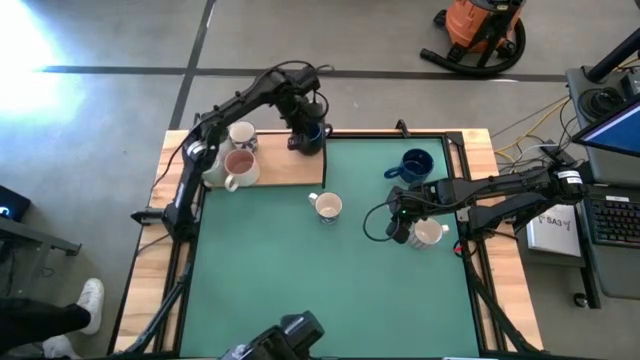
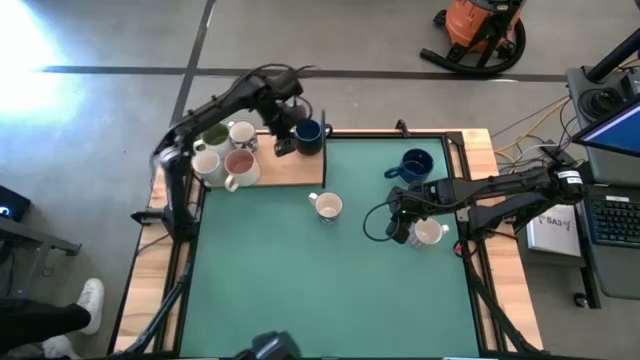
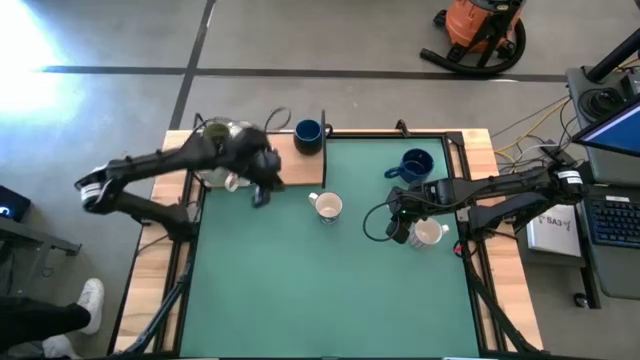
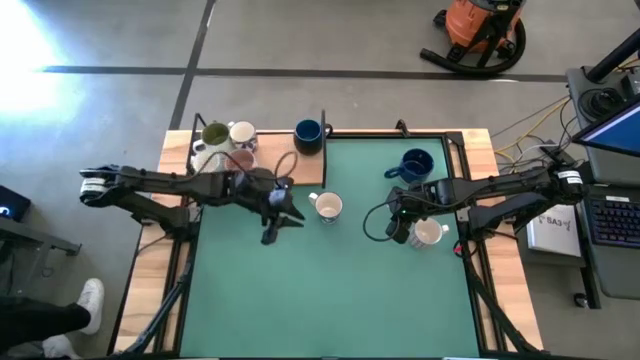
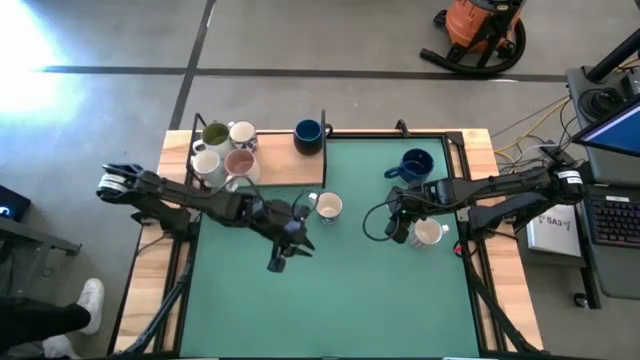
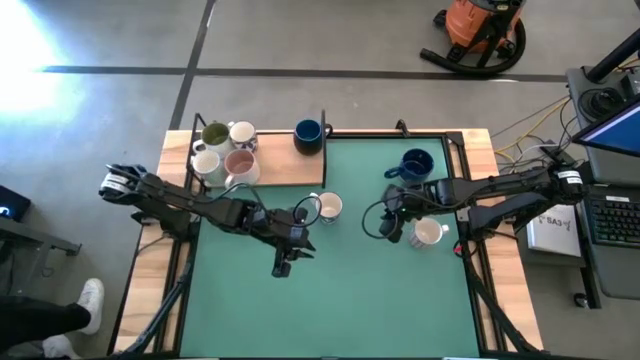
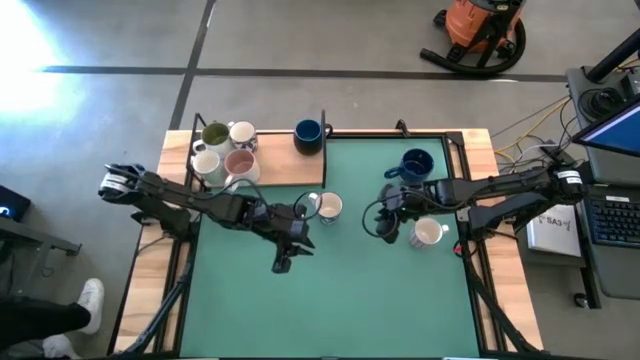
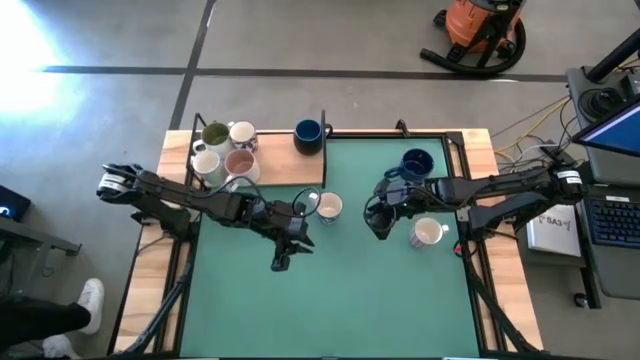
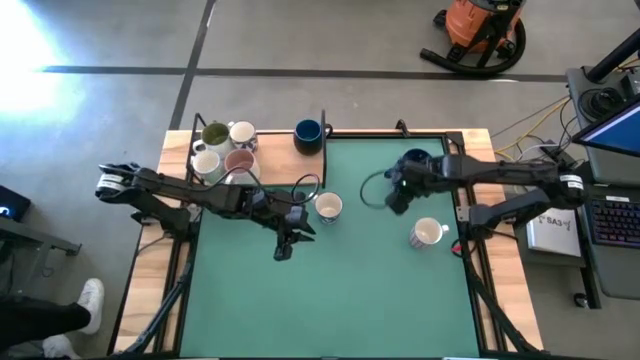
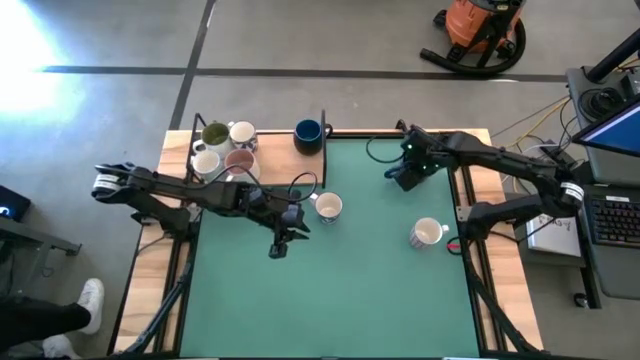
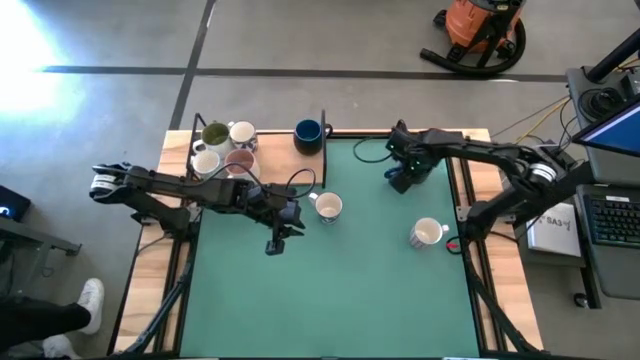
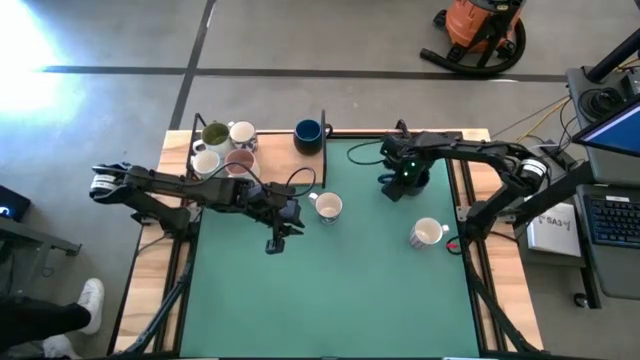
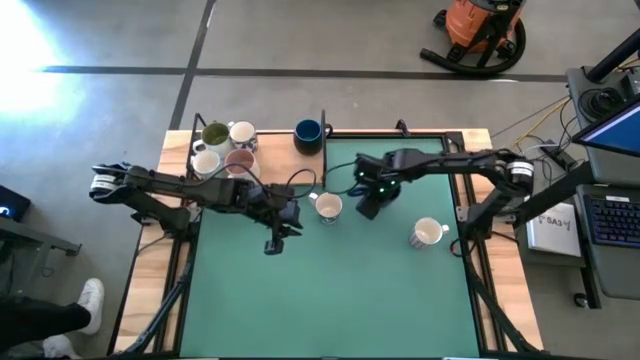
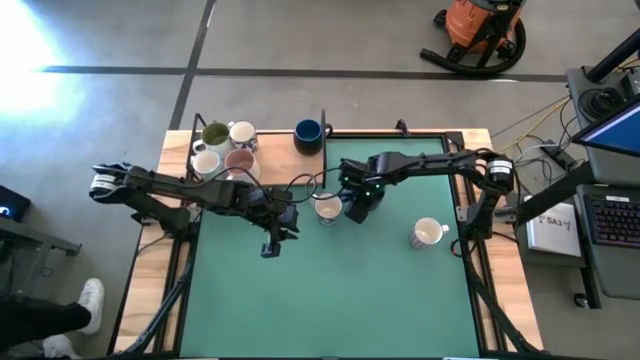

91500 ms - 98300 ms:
Task: Place coffee mugs
Move the blue mug to the center of the table

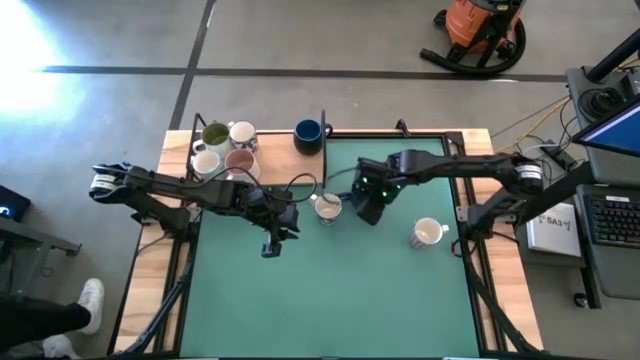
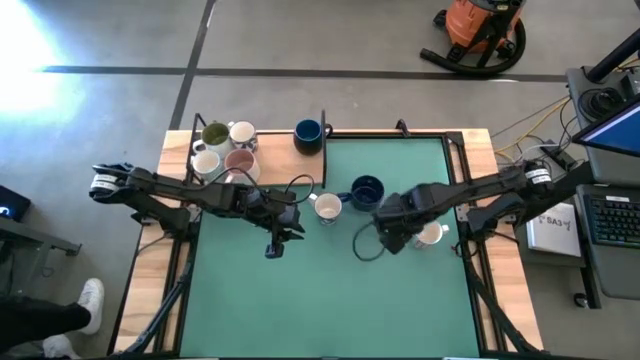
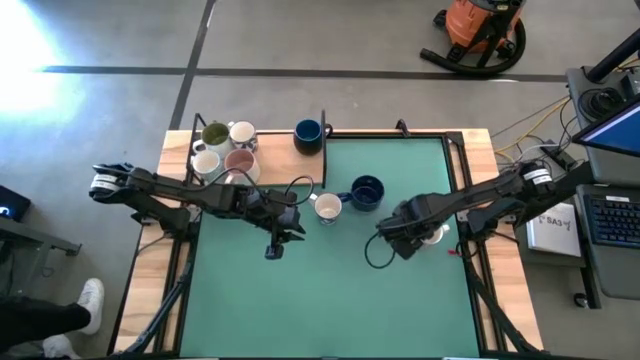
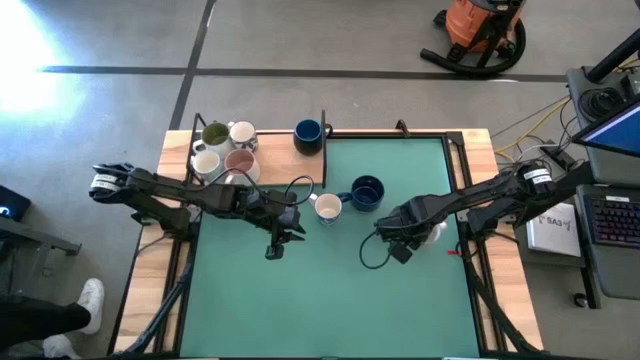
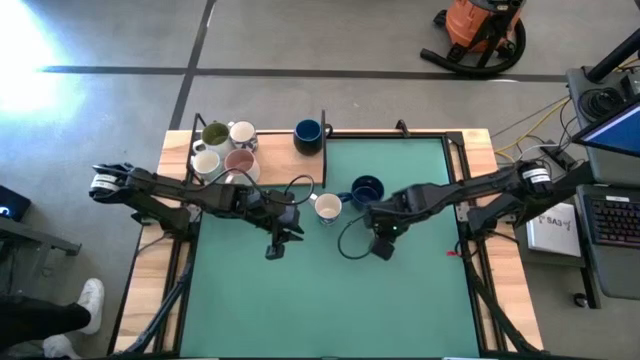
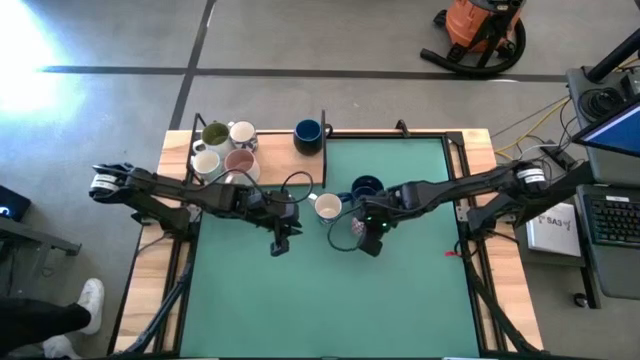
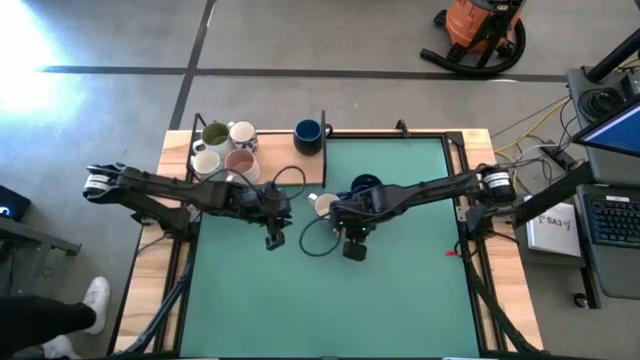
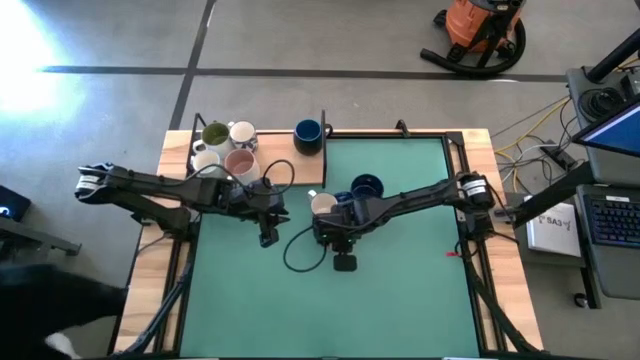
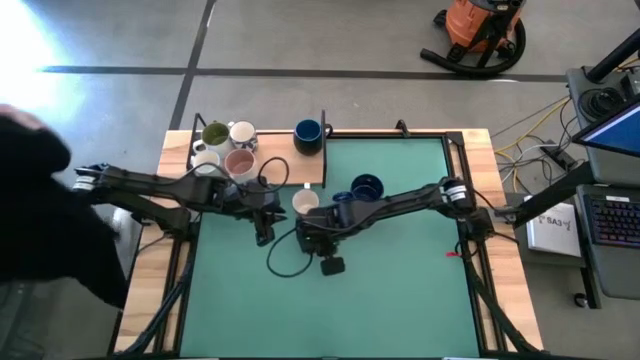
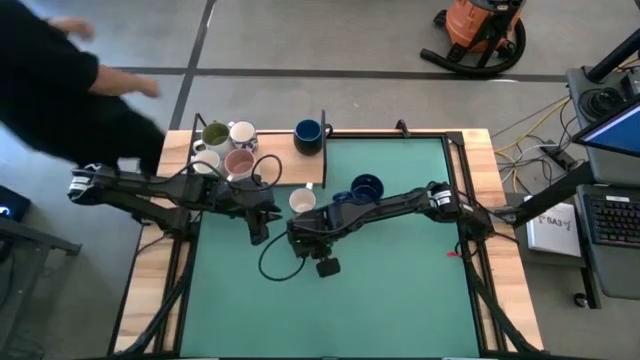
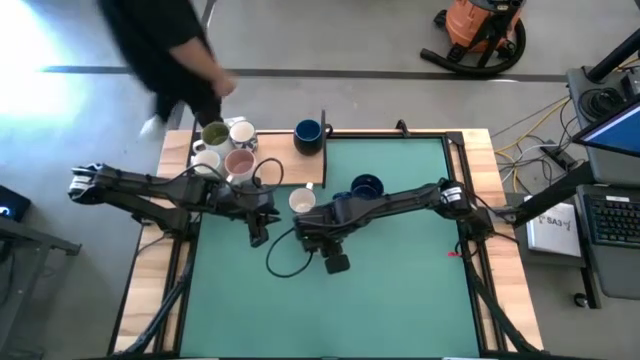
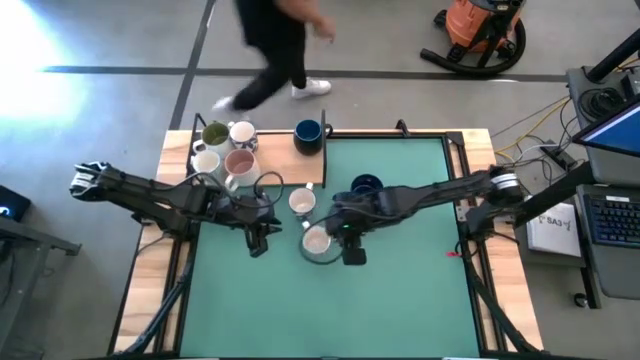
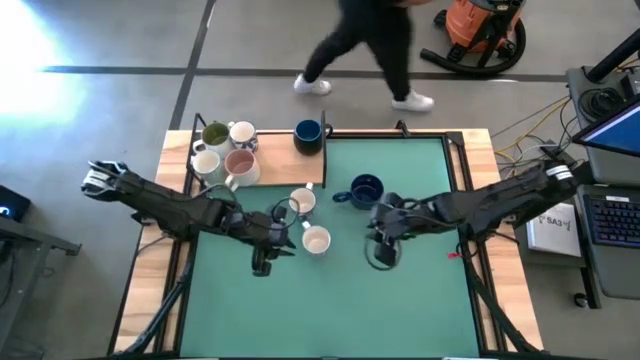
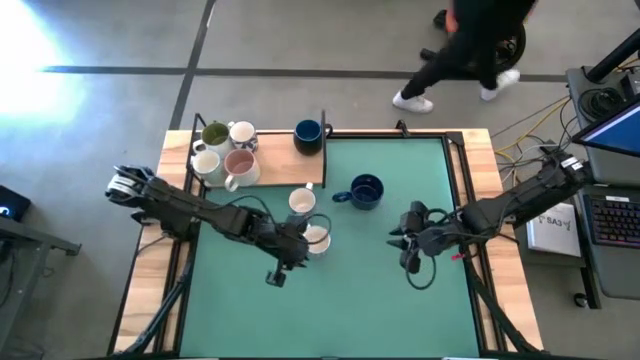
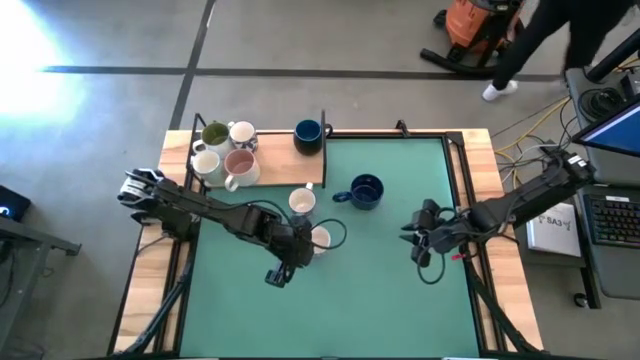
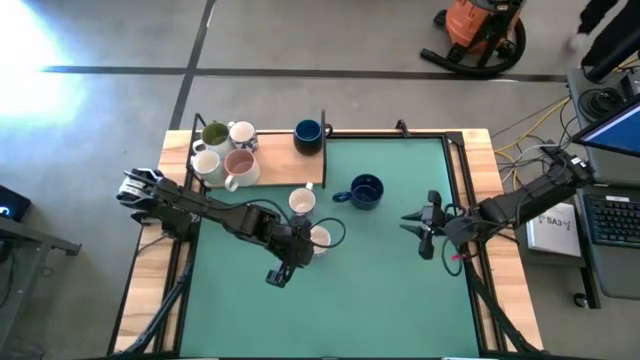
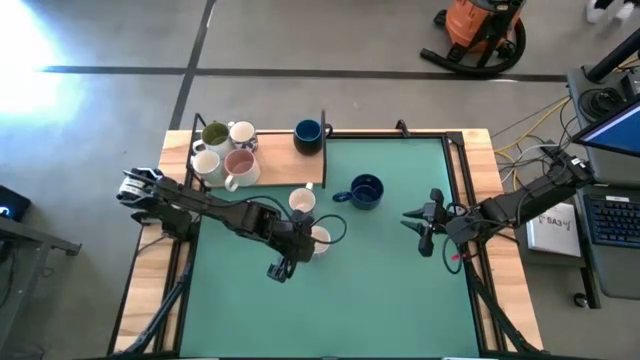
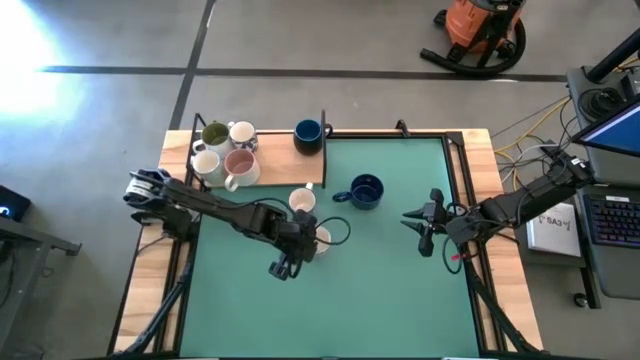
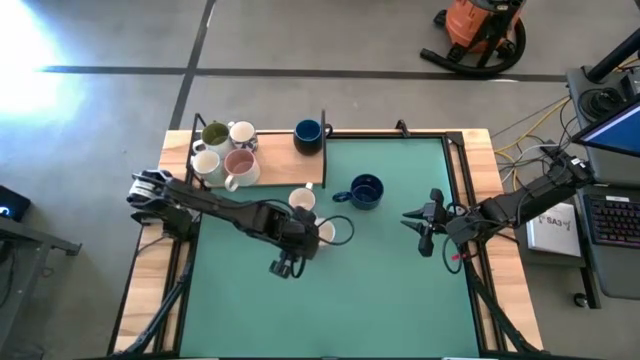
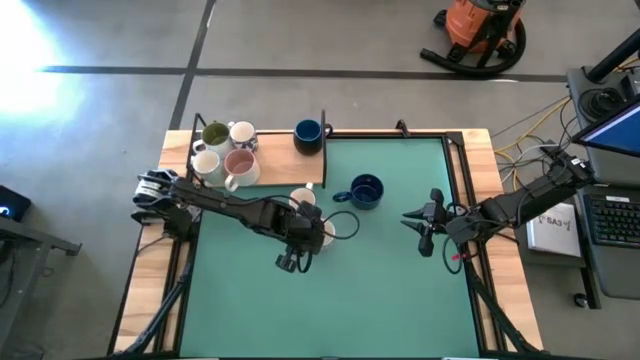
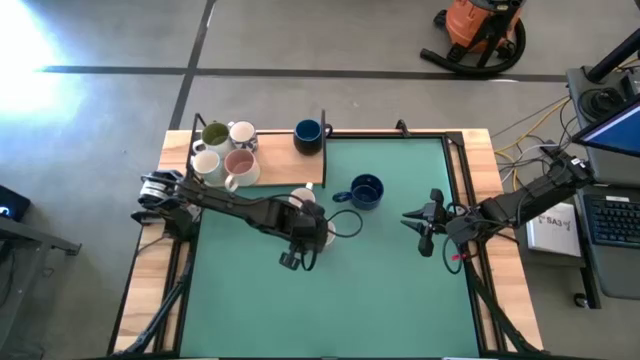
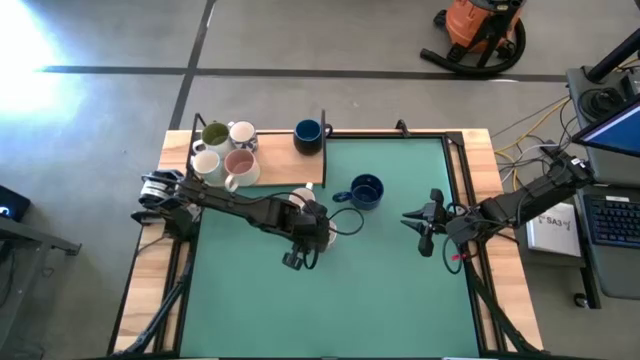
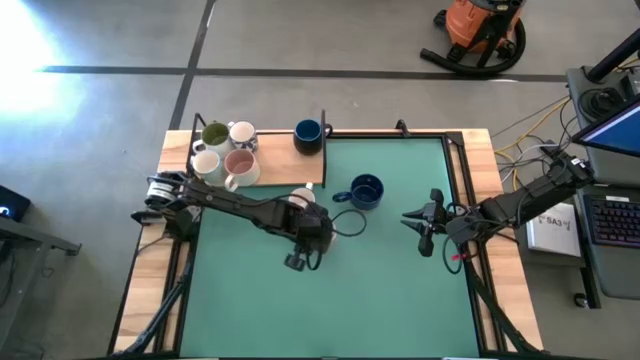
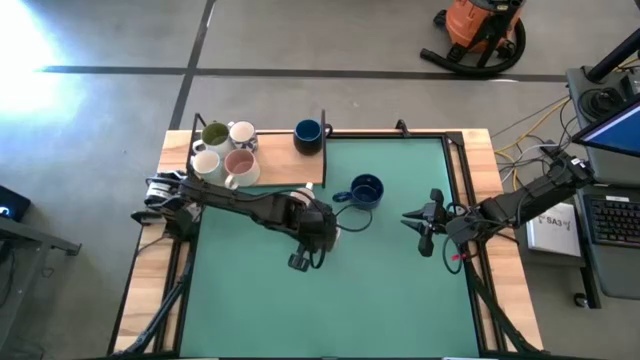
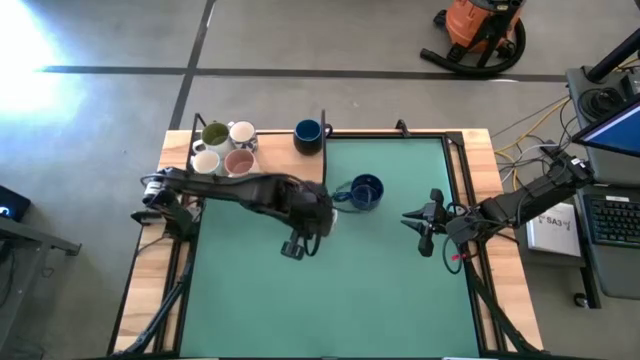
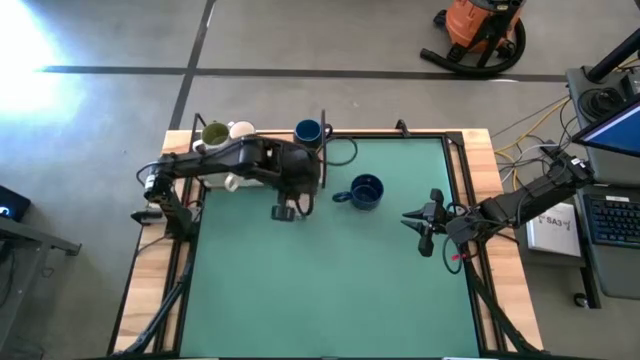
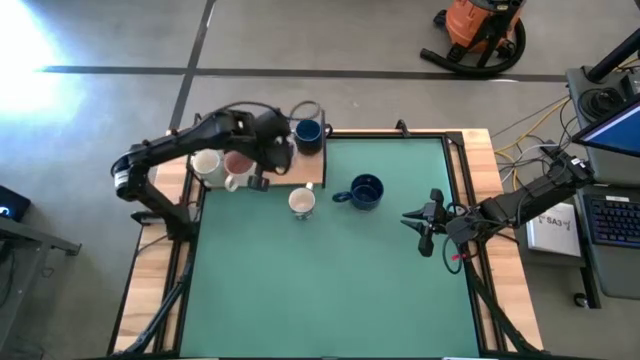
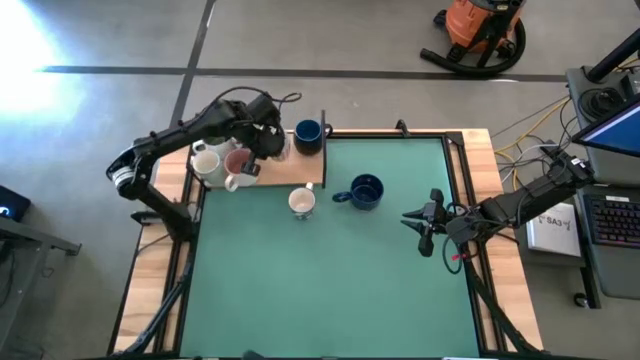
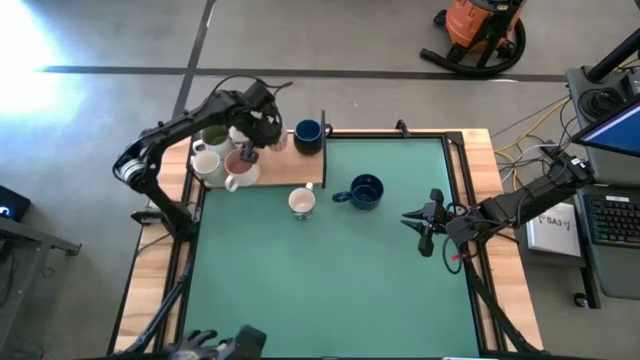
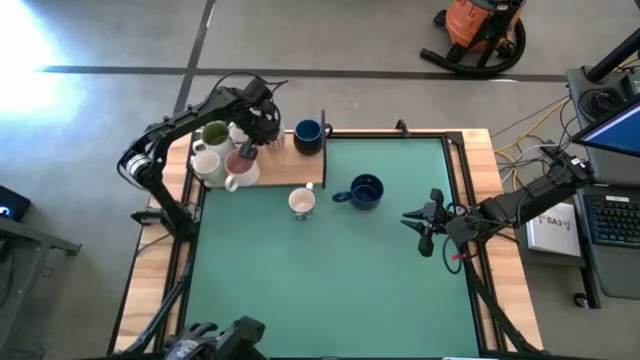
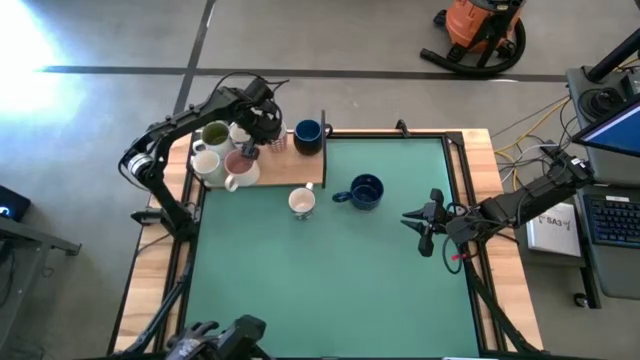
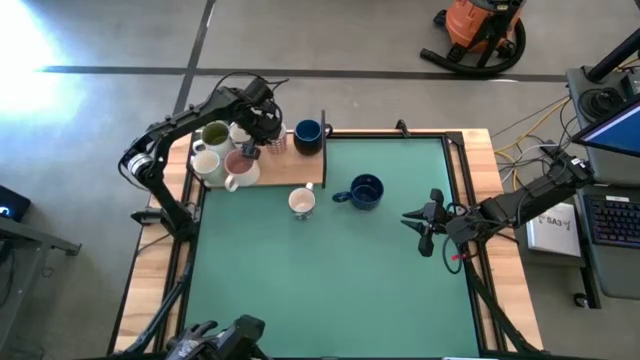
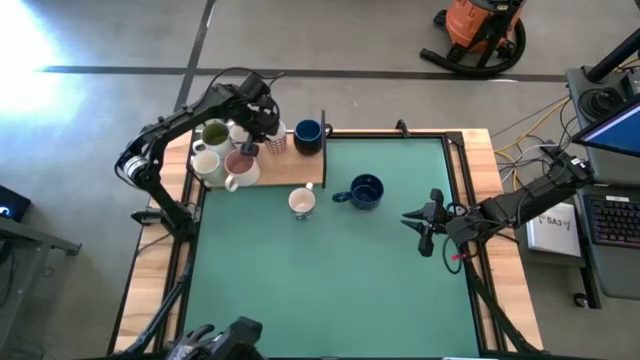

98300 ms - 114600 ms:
Put the red patterned mug on the shelf
